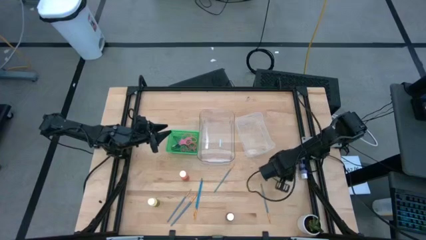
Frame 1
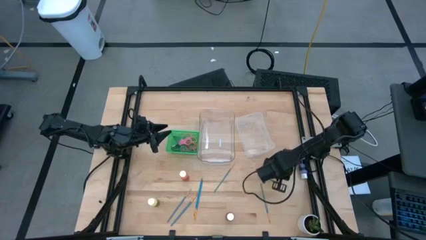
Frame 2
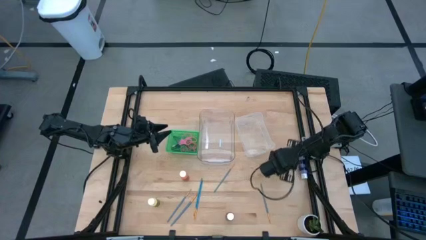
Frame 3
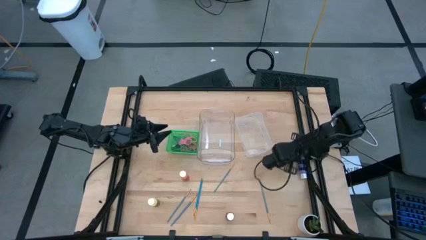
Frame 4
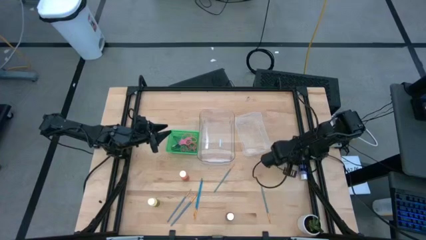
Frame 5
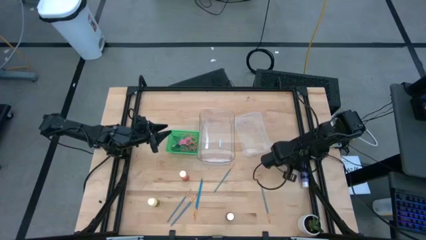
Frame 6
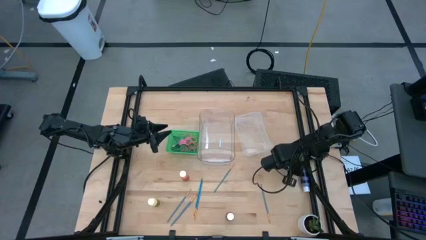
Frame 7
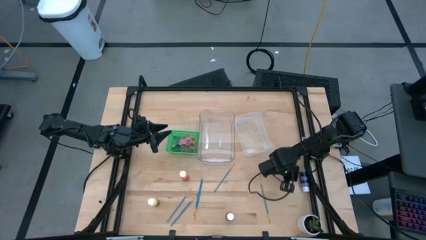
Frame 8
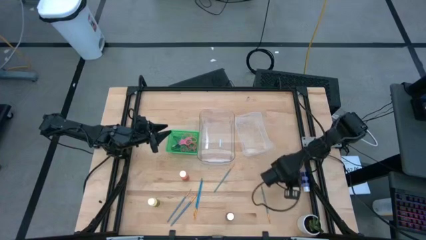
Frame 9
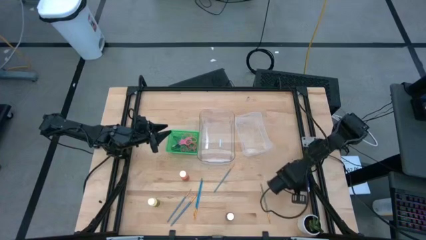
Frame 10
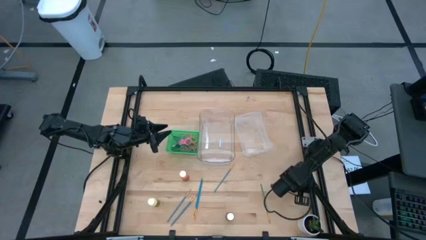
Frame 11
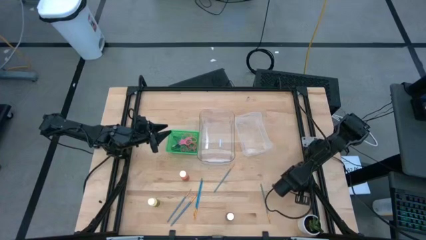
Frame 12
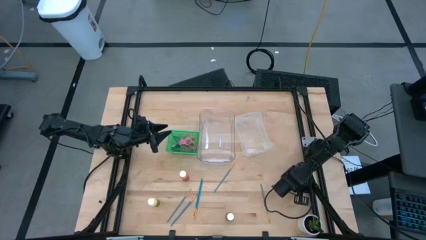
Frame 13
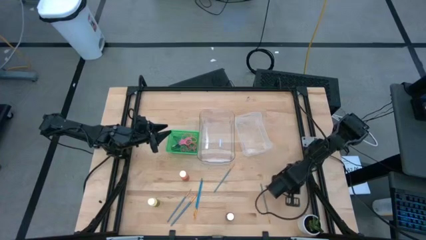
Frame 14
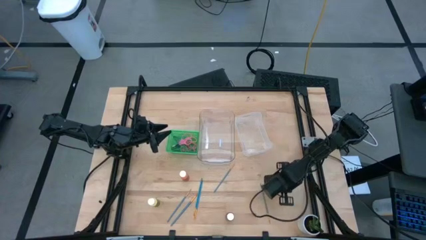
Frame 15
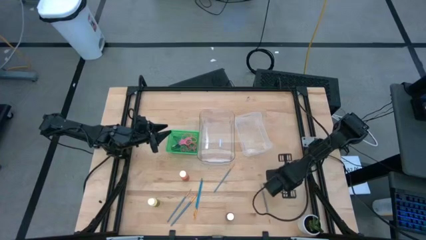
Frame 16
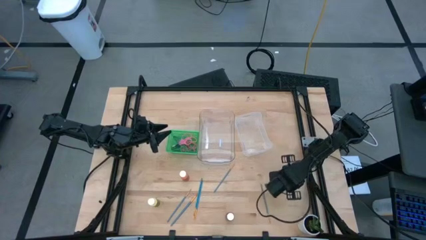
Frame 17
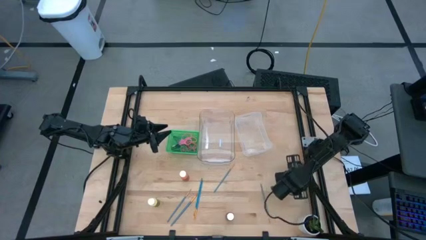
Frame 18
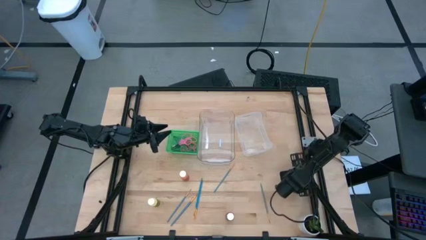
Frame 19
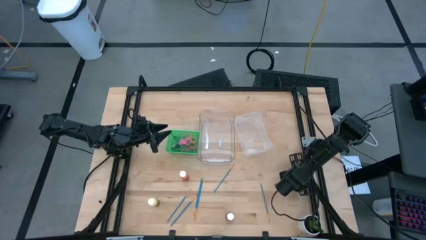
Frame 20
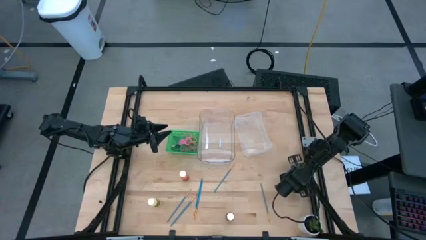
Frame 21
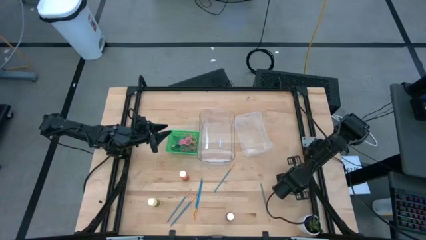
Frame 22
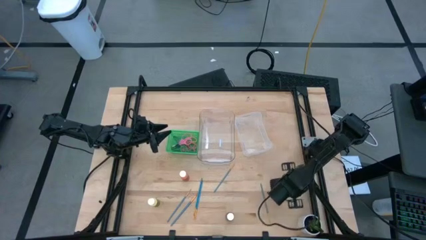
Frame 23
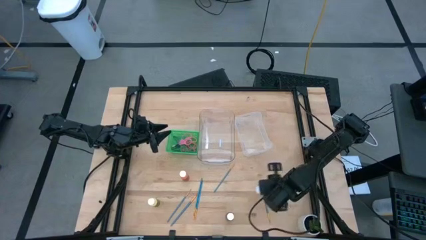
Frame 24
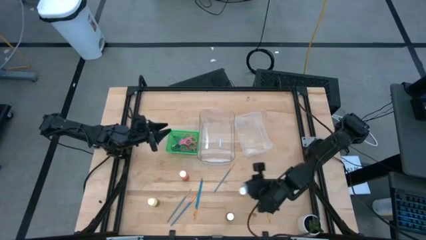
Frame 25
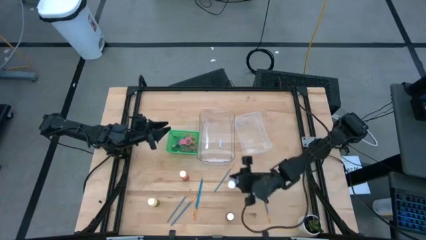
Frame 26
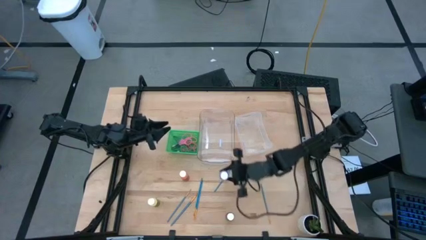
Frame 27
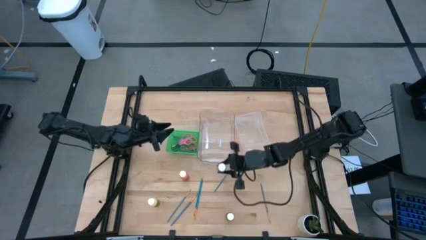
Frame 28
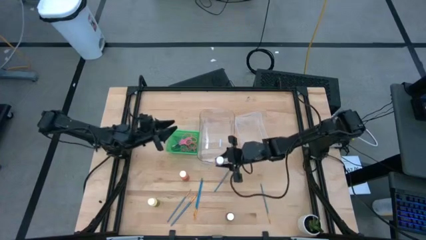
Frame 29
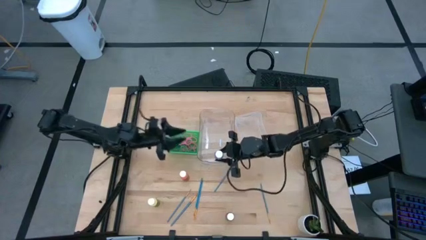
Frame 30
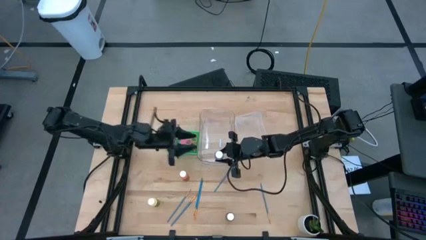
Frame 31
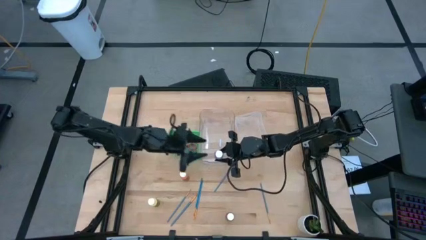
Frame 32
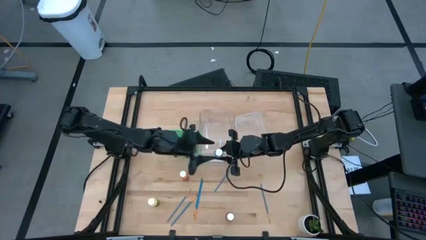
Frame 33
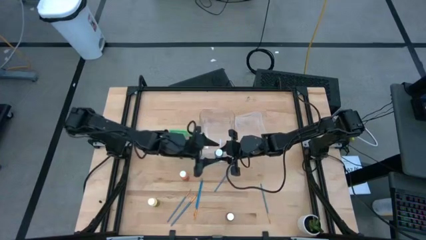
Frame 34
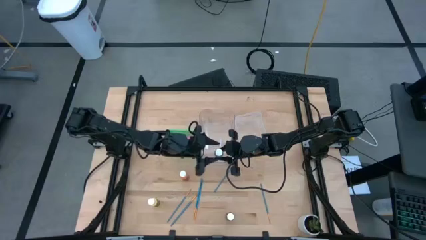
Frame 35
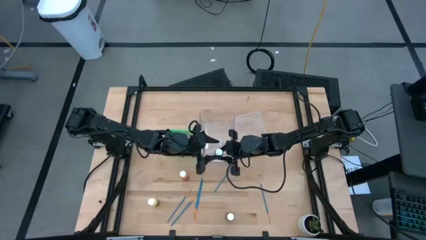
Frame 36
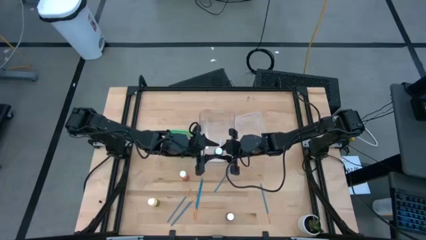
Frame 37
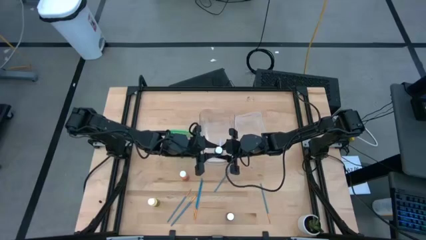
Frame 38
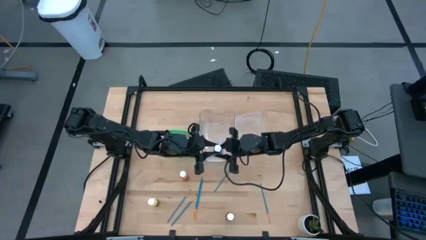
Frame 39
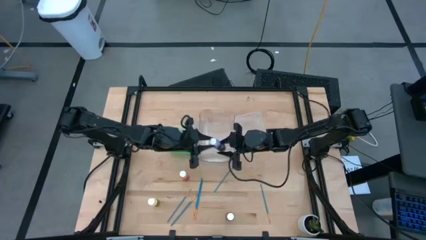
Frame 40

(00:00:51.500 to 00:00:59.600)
Task: Pick & Place Paint Supplies
Put the violet paint bottle into the transparent bin

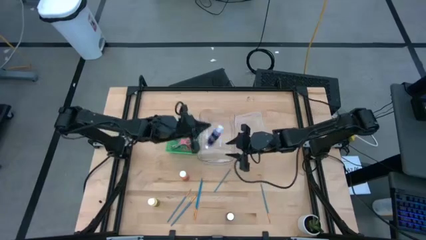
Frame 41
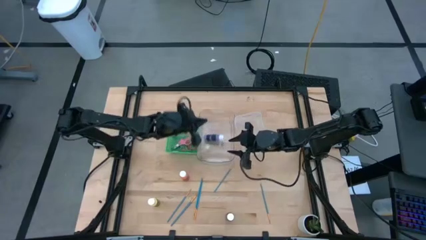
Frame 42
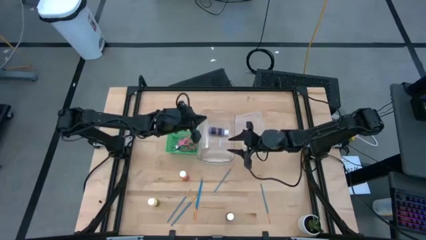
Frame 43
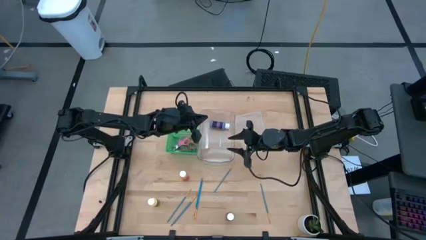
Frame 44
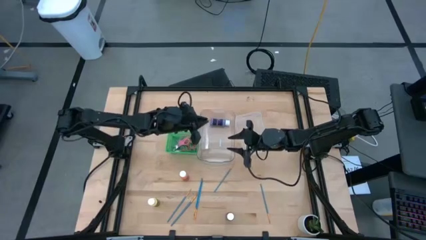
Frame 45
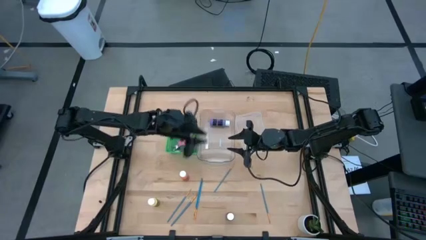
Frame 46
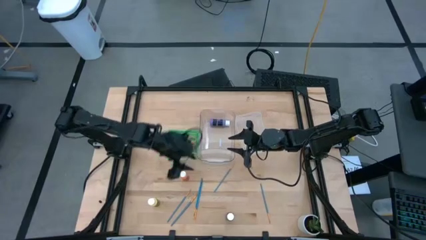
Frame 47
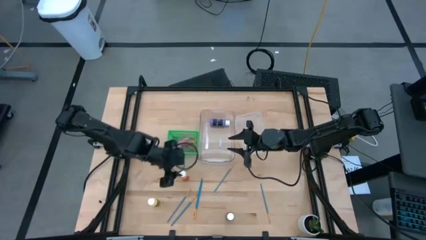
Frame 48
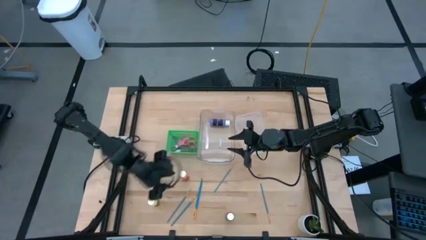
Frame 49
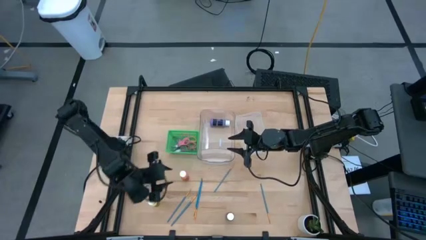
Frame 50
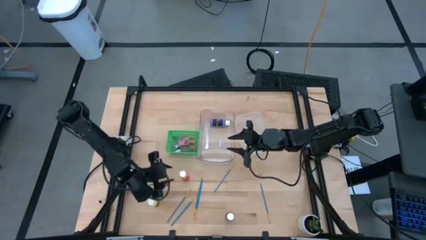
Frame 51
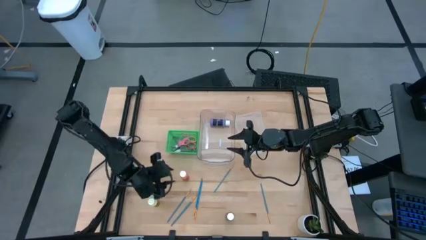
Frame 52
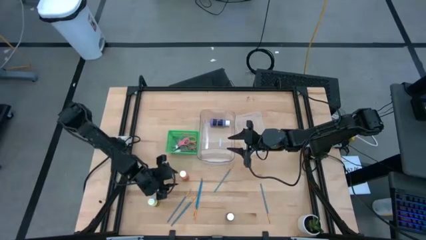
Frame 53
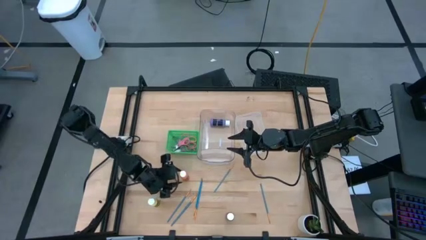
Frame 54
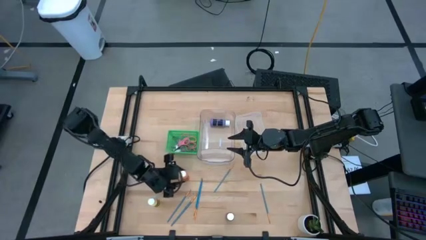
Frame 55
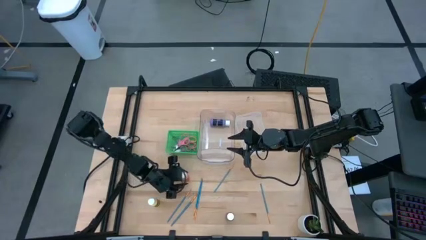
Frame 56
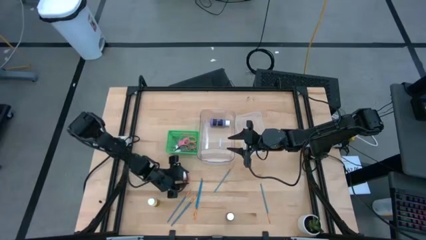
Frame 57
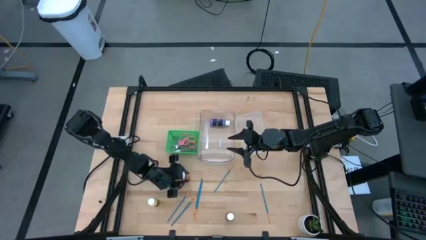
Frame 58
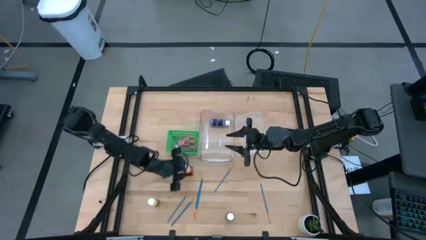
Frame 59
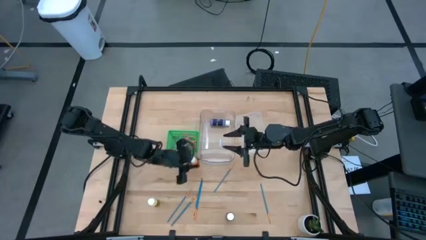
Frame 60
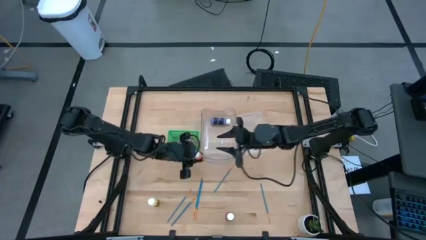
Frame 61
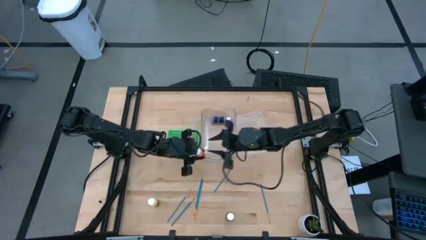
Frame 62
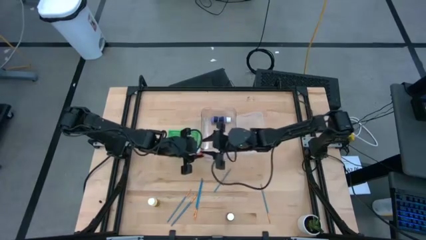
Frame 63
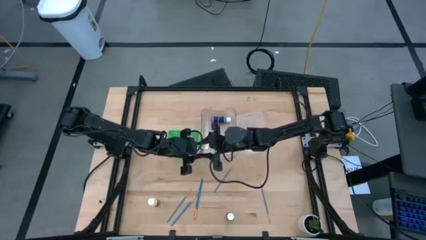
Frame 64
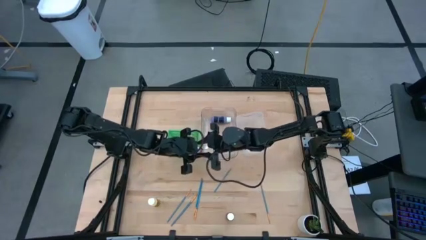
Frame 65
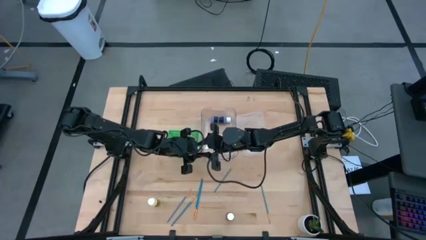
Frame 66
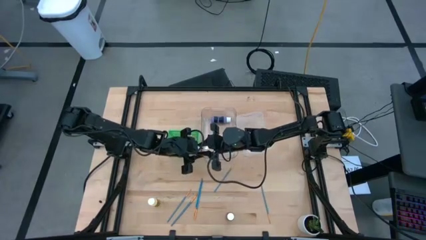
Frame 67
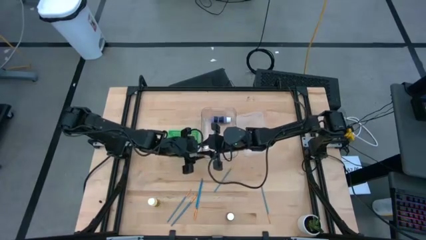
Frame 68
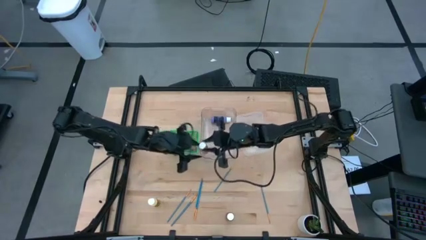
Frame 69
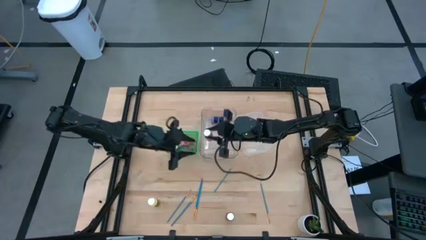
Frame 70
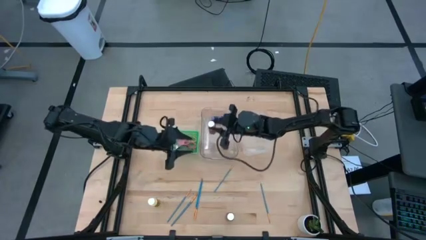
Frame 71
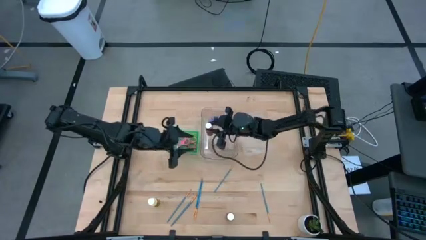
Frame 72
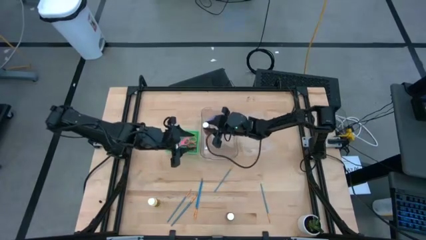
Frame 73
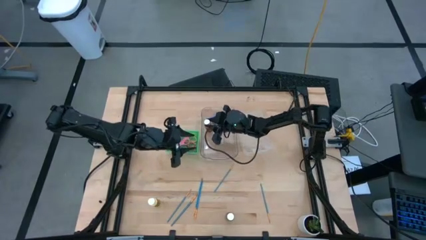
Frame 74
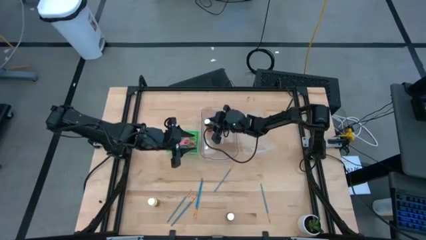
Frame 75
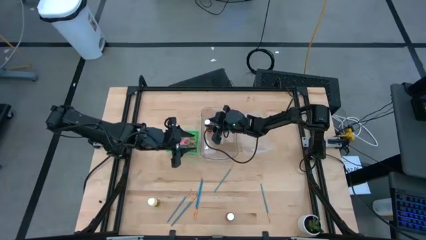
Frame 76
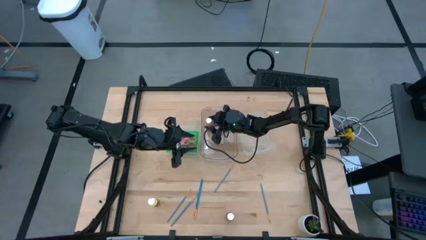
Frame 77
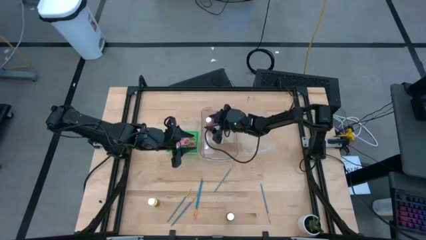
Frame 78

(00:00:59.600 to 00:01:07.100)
Put the orange paint bottle into the transparent bin

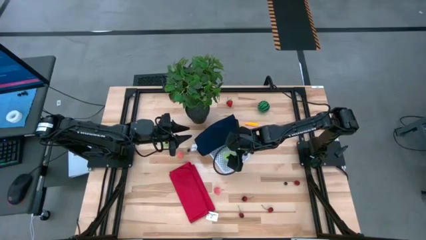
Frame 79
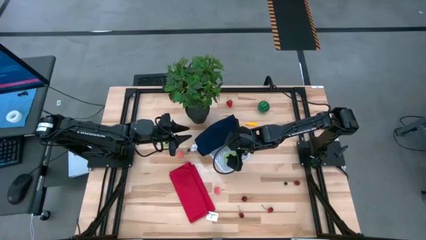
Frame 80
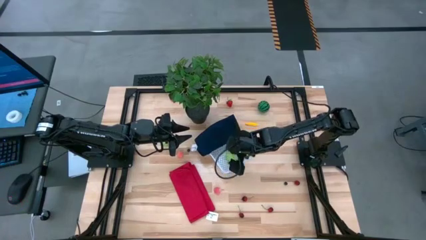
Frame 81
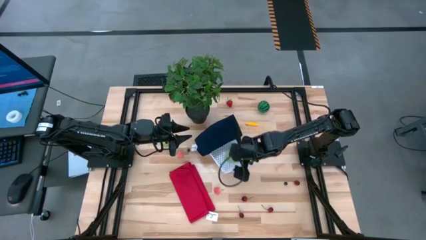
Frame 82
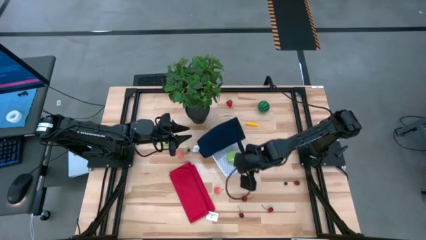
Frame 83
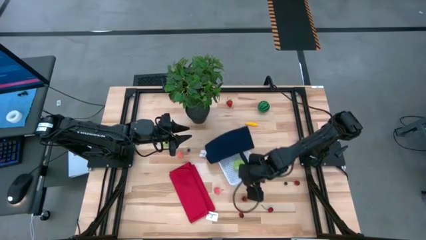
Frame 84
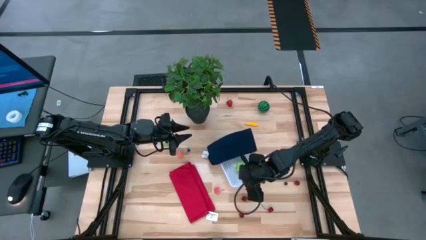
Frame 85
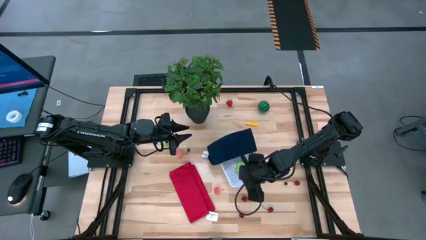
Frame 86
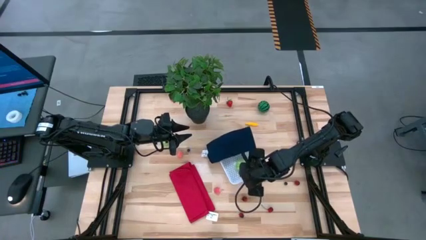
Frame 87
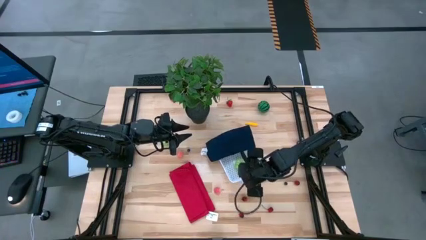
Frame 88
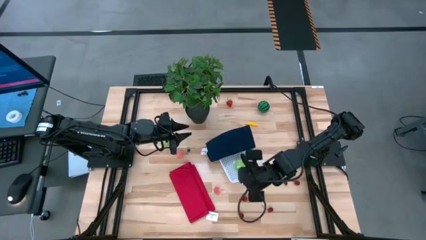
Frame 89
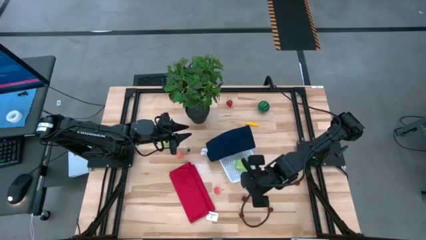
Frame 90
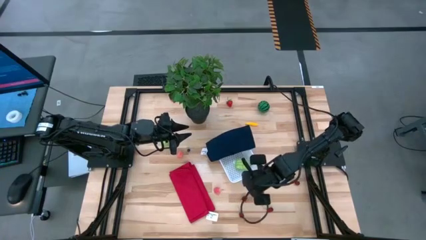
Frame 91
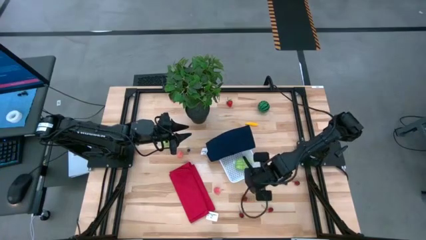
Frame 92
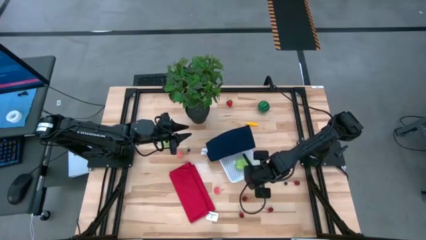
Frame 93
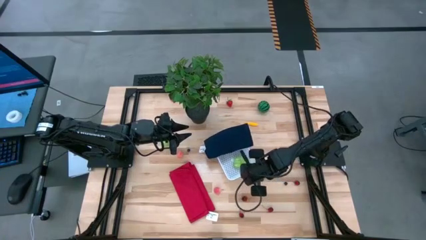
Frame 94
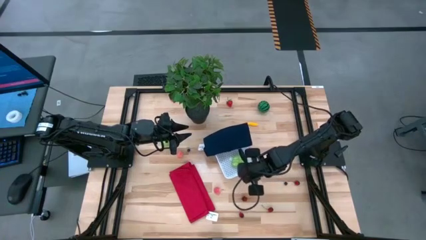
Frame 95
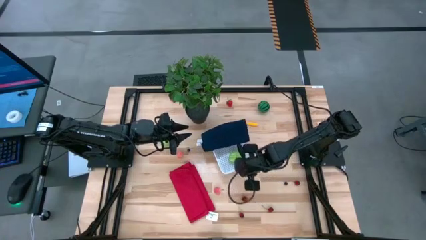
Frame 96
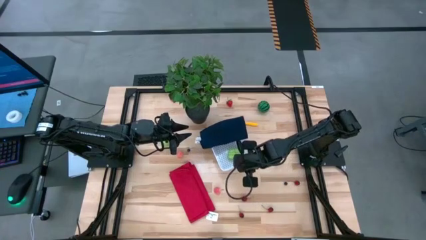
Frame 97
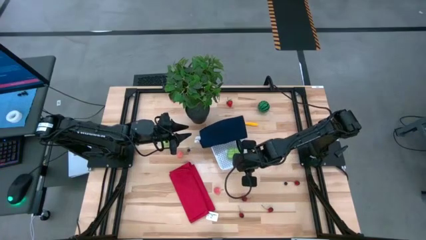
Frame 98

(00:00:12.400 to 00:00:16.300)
Task: Pick and placing Produce into tupperware
Adjust the bin
